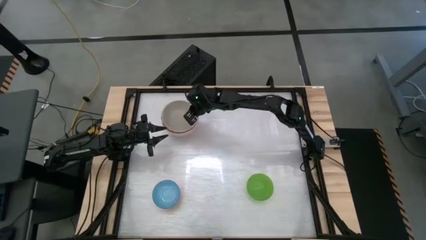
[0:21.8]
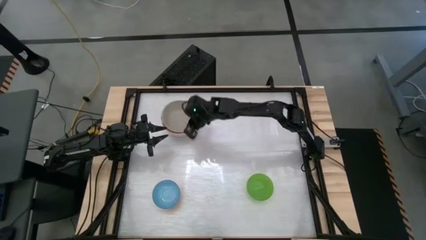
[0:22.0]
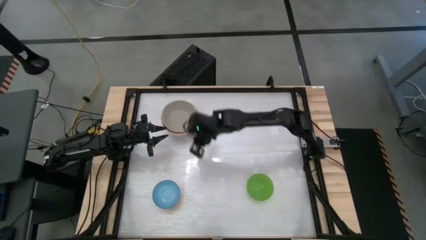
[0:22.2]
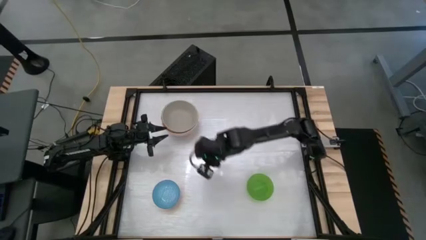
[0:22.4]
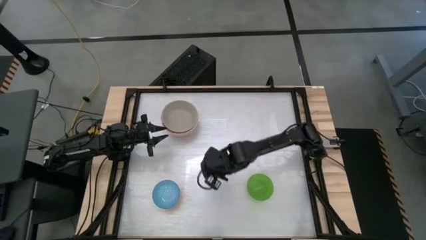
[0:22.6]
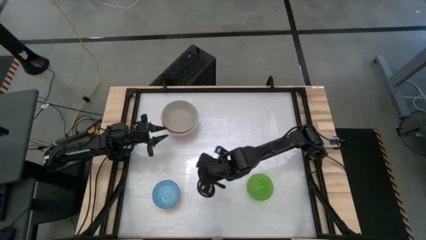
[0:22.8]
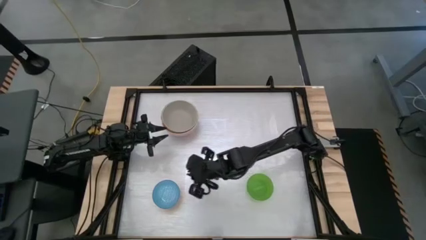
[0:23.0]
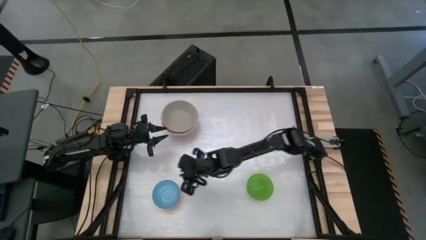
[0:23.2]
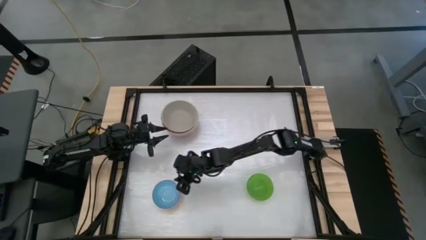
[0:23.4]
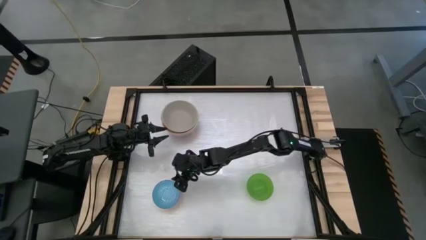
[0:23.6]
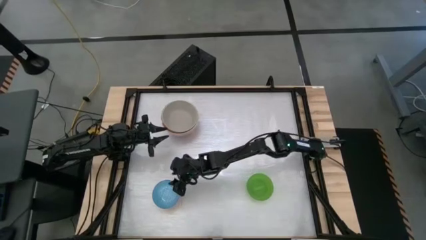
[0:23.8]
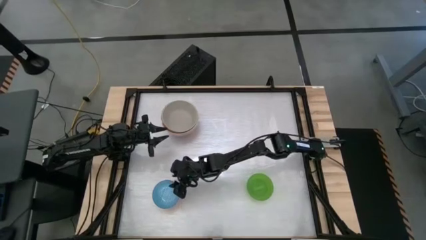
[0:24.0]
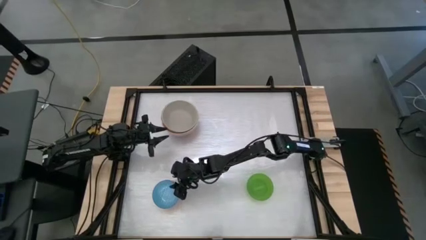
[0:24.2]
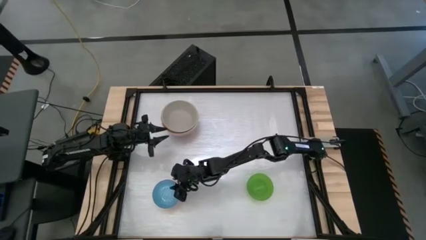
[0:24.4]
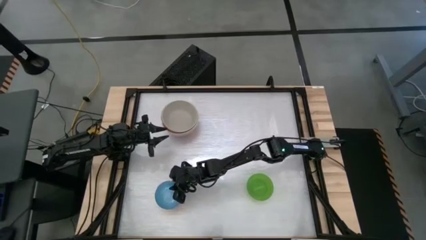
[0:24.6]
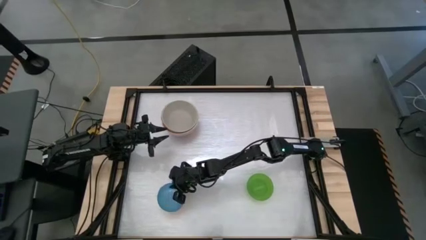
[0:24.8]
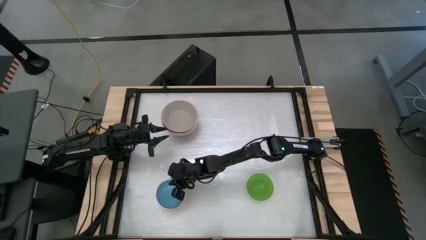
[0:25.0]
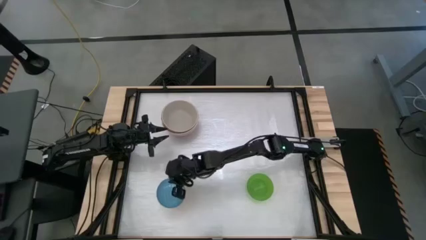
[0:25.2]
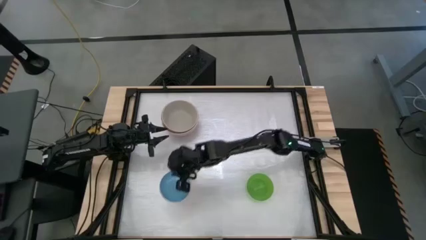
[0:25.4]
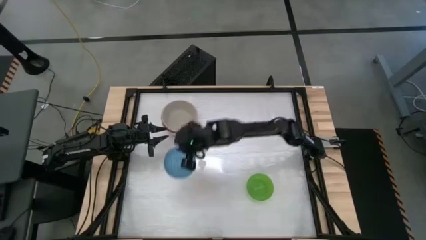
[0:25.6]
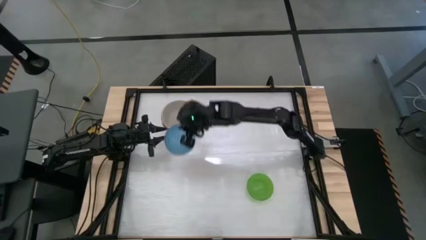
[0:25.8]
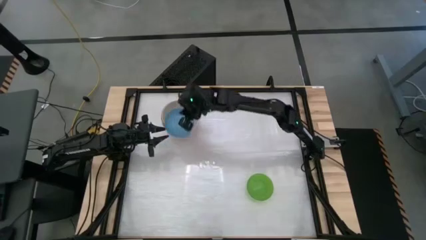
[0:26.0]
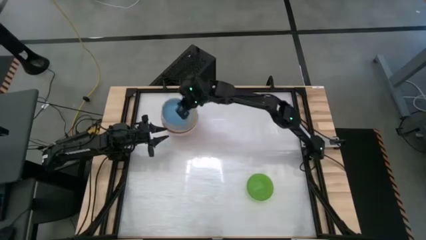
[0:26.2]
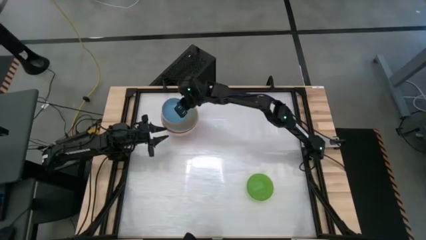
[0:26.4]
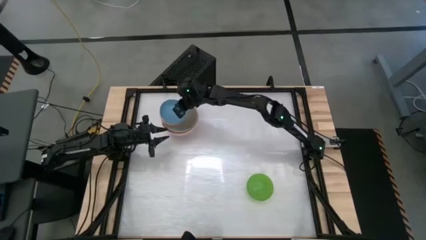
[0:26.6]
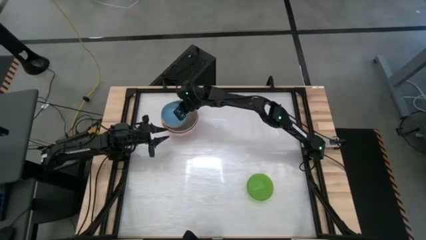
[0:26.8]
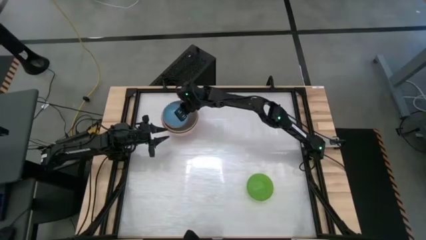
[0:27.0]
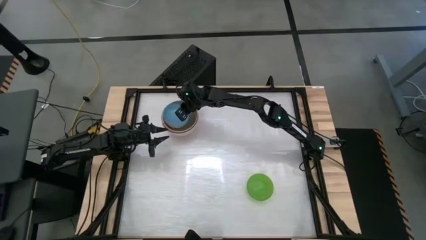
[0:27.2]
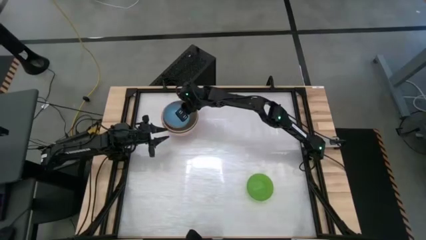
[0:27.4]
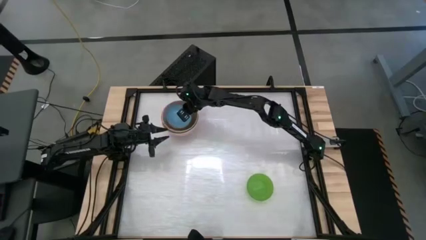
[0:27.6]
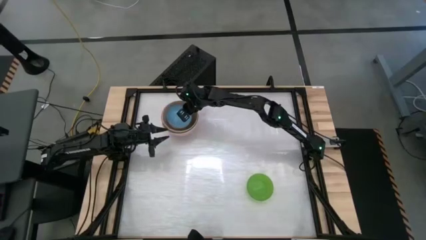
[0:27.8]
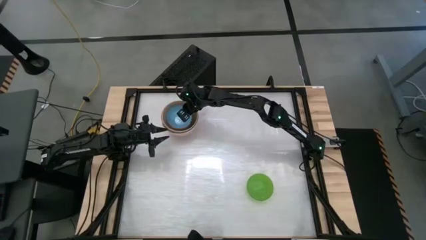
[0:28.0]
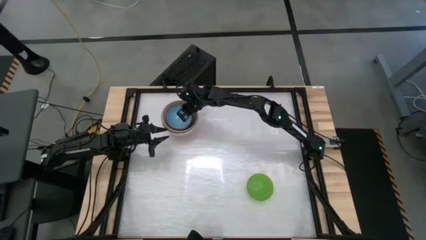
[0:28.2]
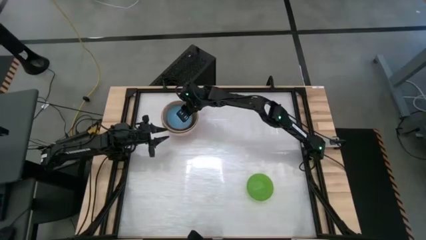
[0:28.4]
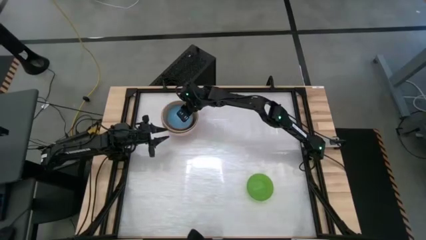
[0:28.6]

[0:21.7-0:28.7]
Stack the blue bowl on top of the gray bowl

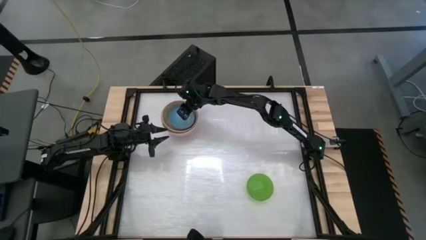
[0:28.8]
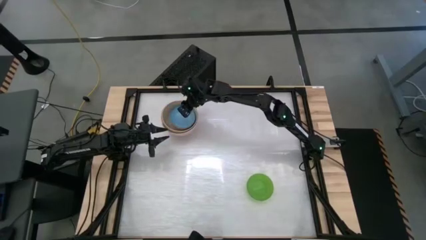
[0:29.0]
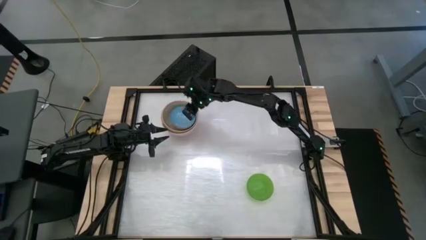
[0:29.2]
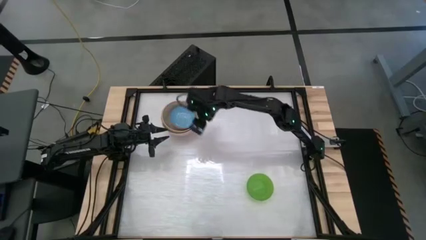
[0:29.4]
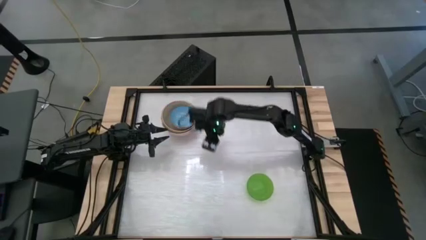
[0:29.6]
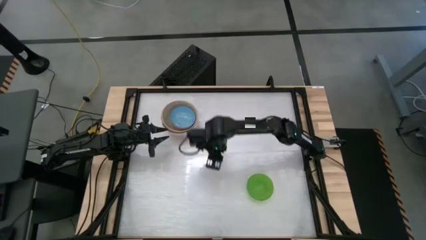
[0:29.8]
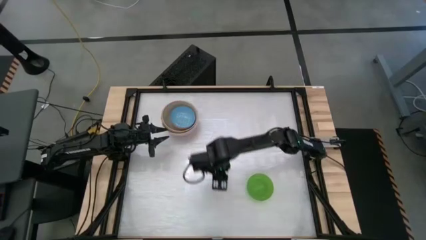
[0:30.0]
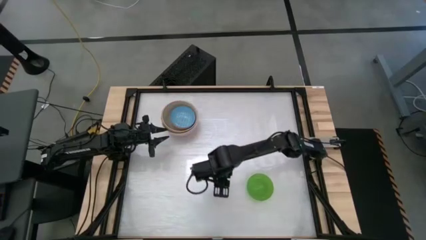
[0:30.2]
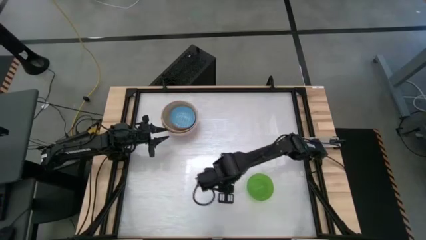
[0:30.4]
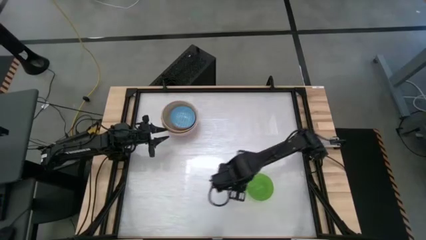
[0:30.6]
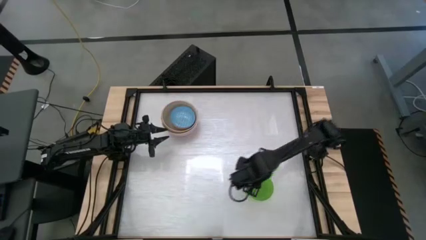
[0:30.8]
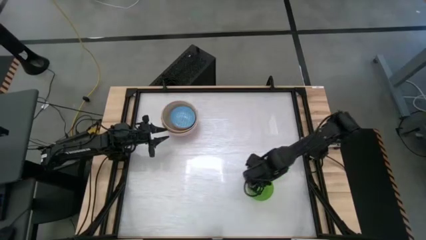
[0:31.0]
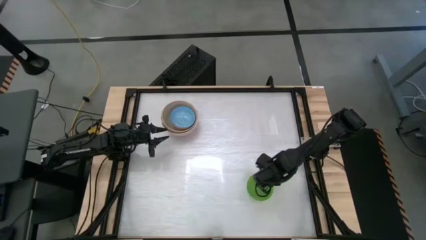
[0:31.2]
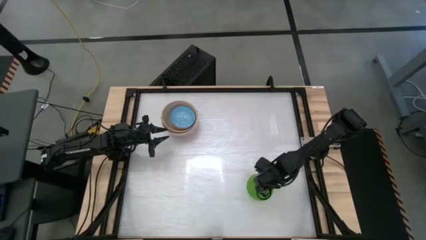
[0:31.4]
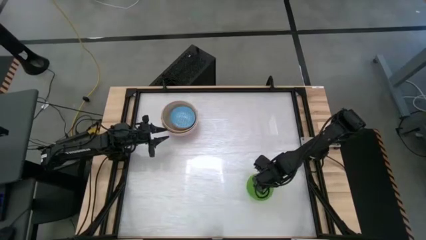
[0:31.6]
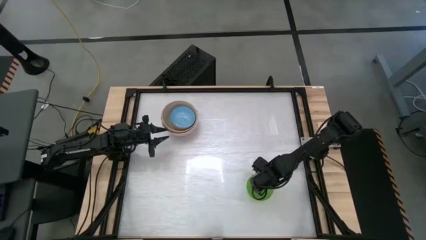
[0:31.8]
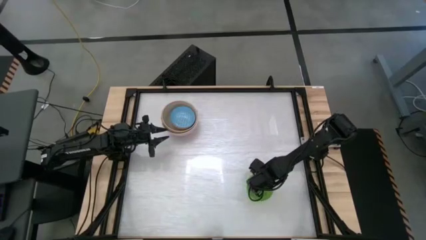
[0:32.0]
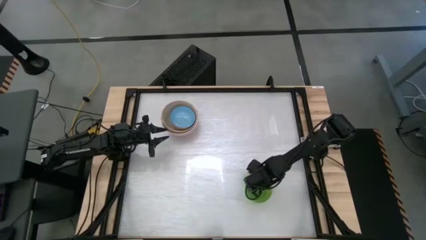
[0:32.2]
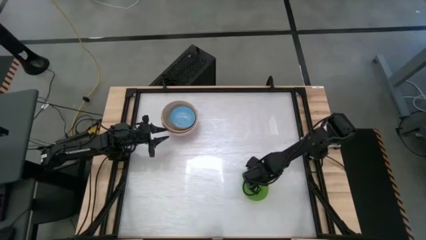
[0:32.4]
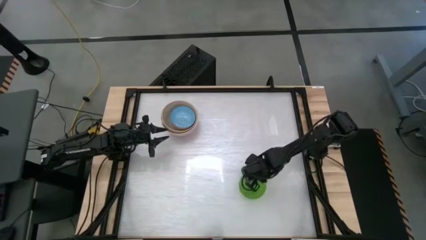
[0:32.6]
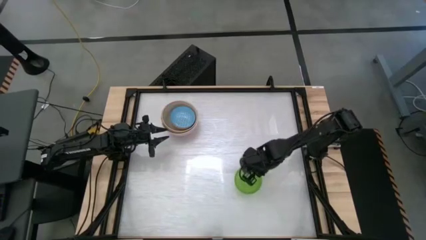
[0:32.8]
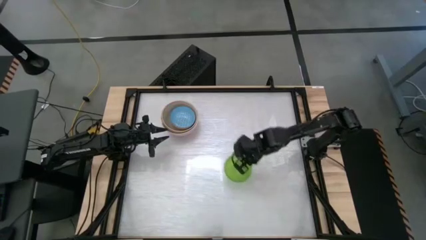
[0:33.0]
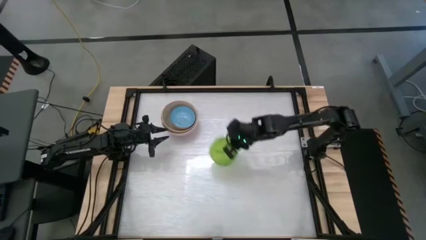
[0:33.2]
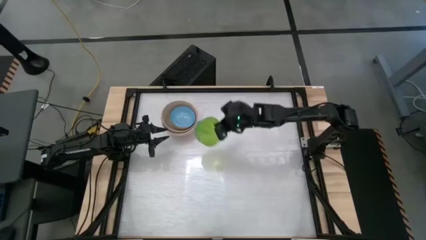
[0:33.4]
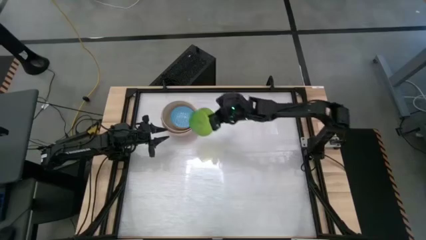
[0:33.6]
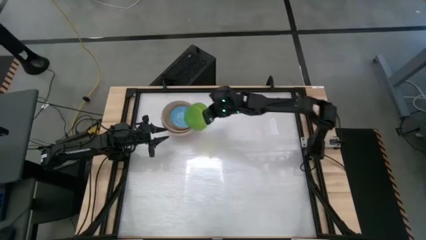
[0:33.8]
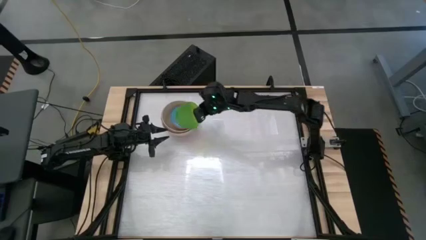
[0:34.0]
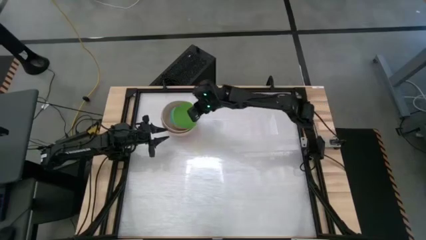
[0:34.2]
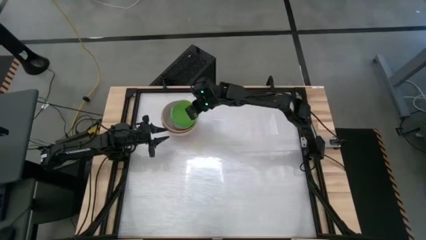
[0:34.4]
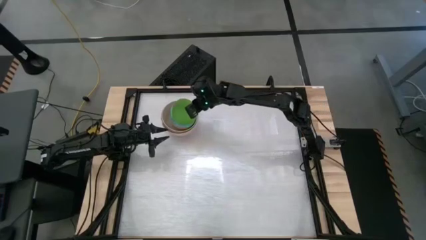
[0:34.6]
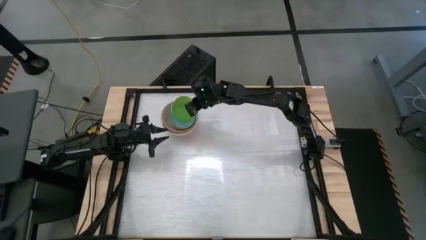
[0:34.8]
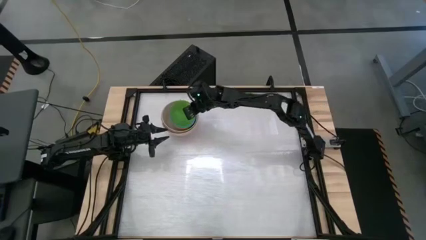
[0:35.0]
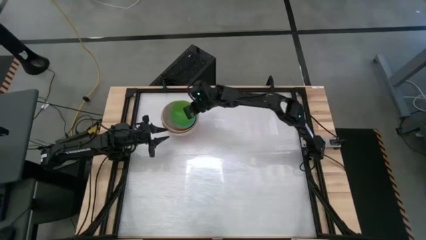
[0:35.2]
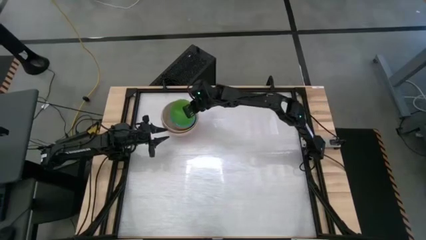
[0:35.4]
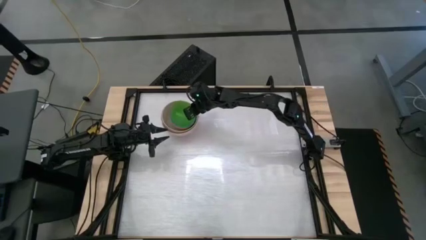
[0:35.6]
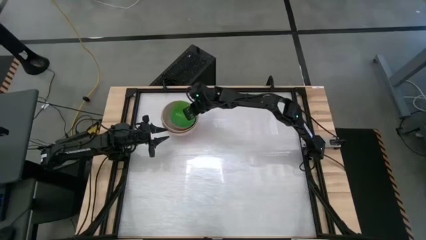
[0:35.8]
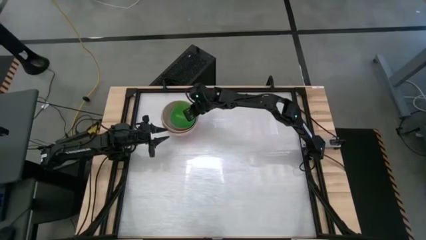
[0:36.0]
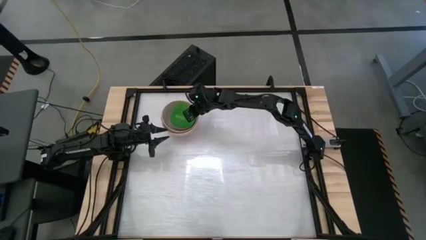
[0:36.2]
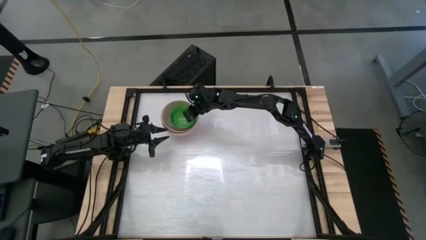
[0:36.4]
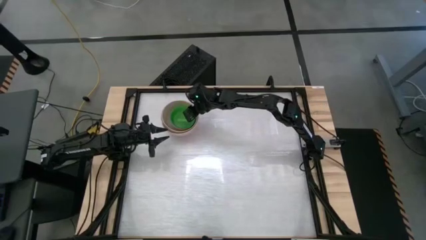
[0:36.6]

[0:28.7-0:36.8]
Stack the green bowl on top of the blue bowl
